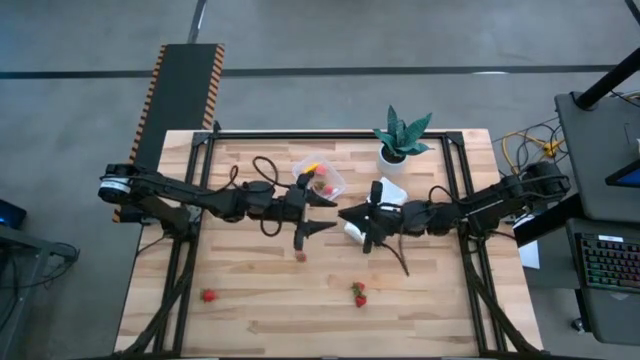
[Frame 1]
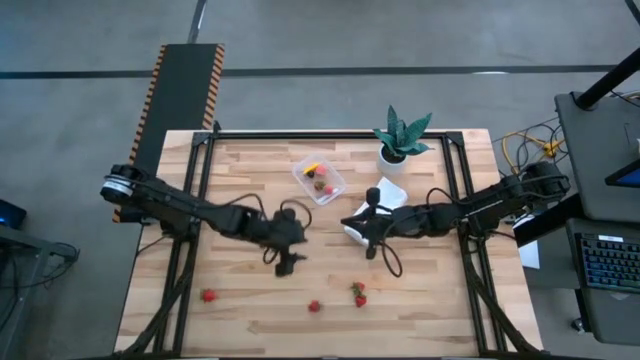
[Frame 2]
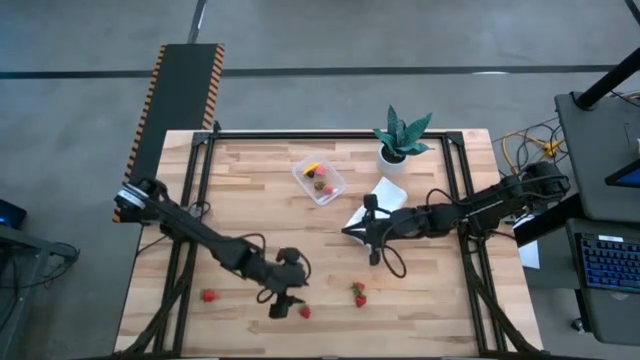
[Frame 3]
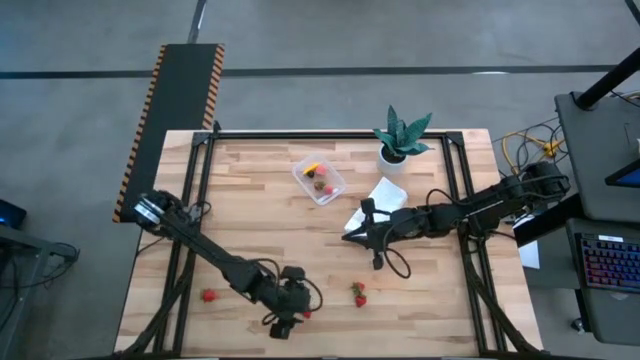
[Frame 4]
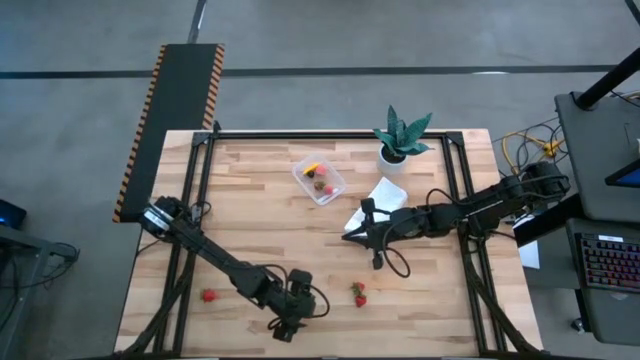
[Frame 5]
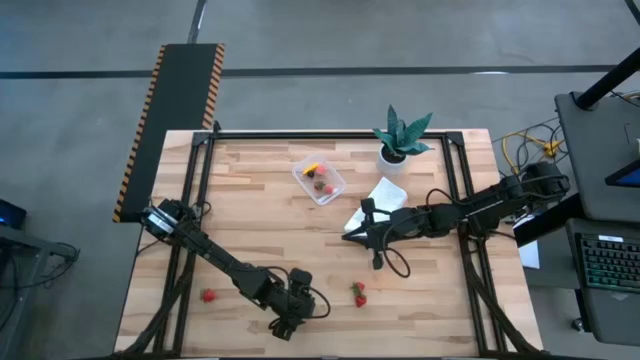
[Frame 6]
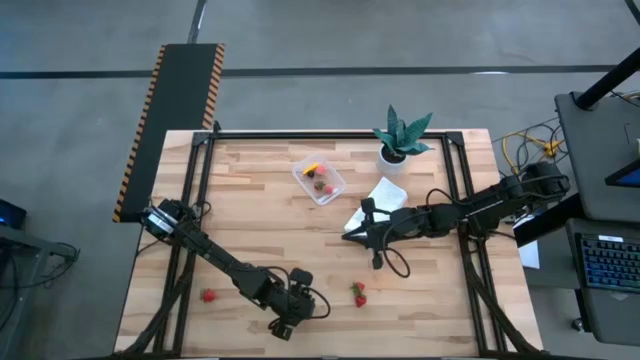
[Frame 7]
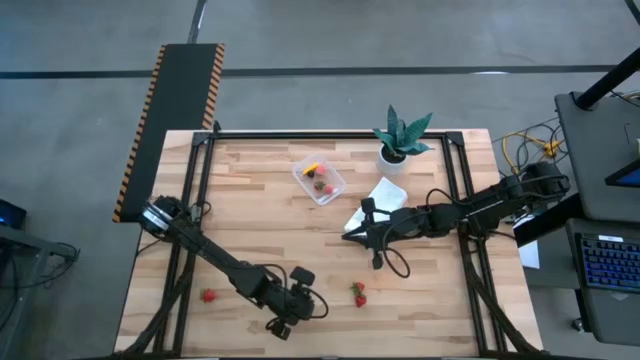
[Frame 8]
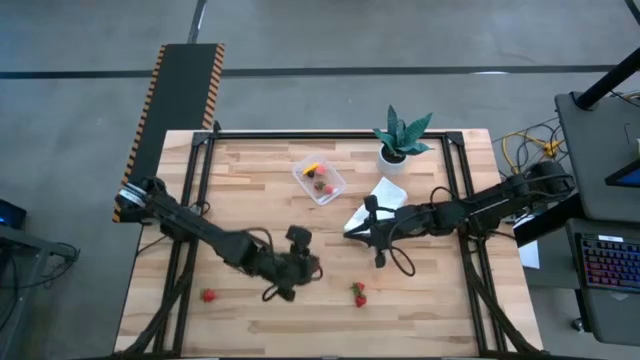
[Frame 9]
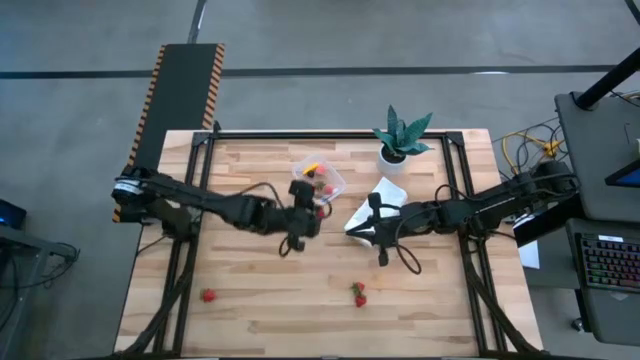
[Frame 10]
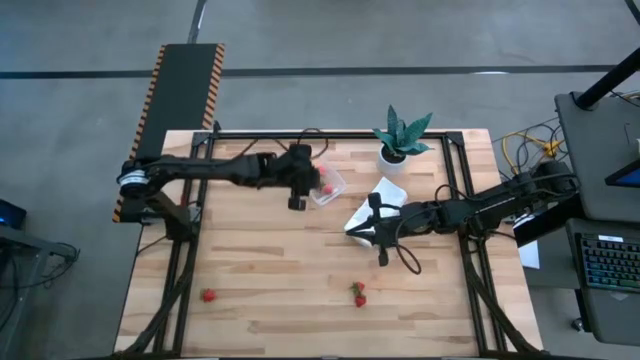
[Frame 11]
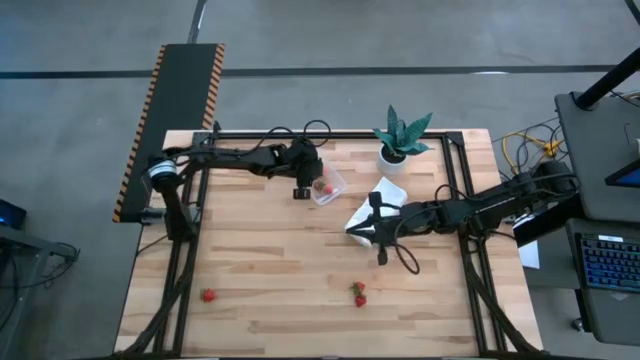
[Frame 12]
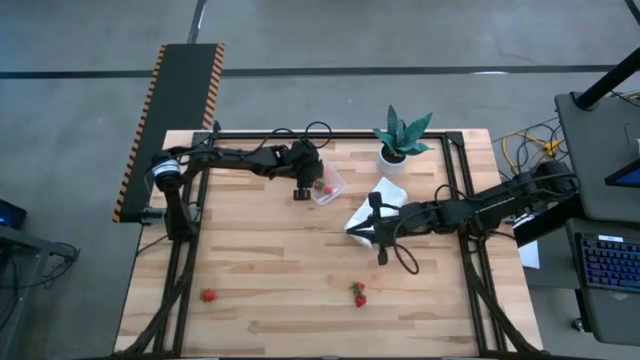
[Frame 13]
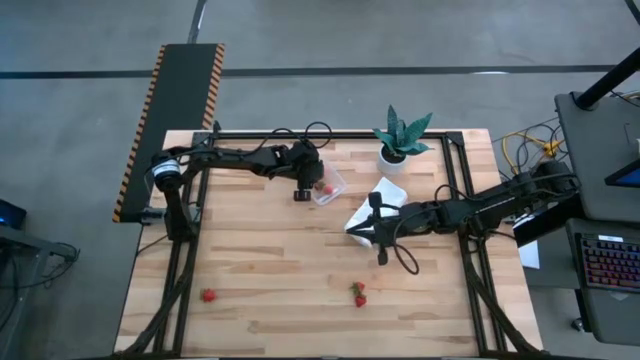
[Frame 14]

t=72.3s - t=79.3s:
Task: Pick and placing Produce into tupperware
Put the strawberry into the transparent bin

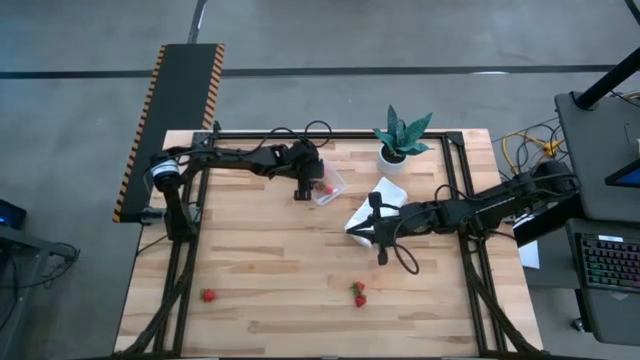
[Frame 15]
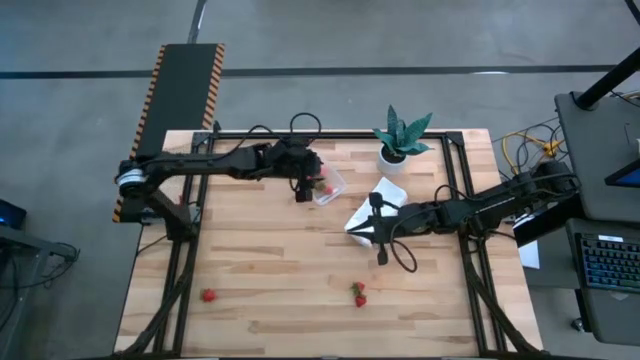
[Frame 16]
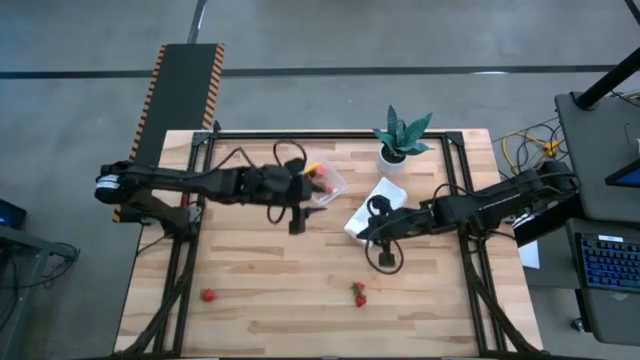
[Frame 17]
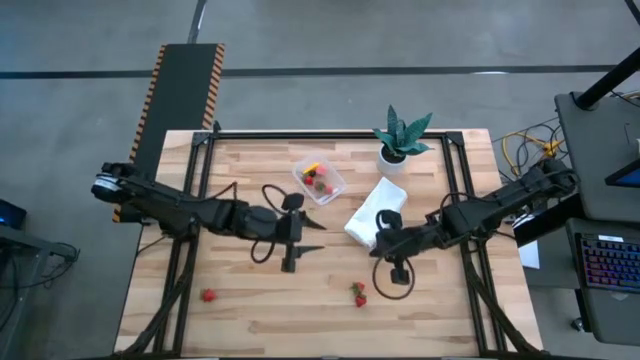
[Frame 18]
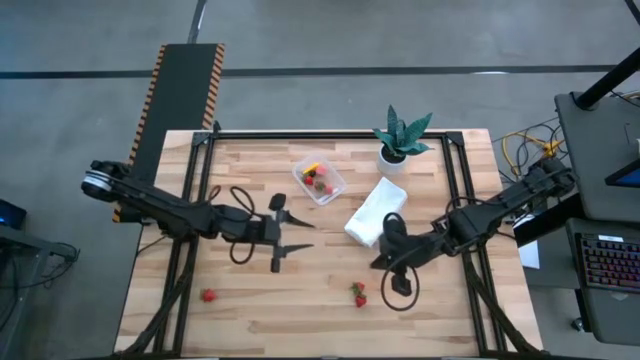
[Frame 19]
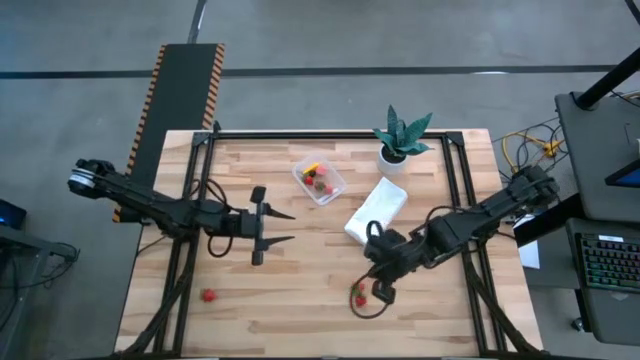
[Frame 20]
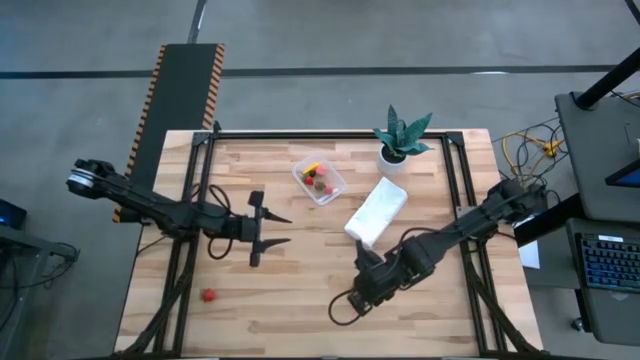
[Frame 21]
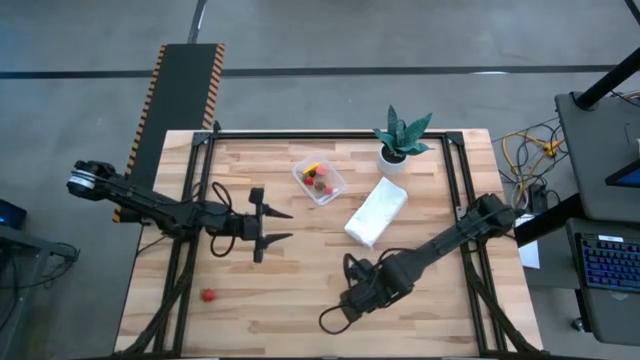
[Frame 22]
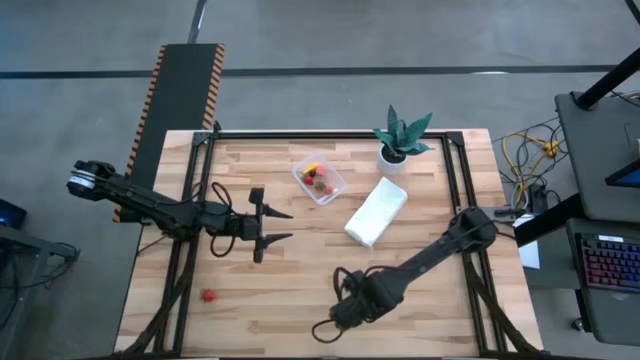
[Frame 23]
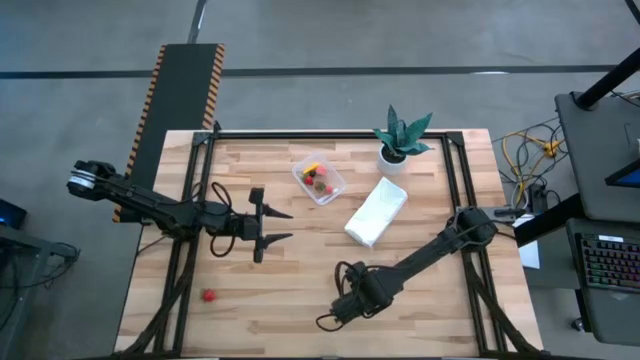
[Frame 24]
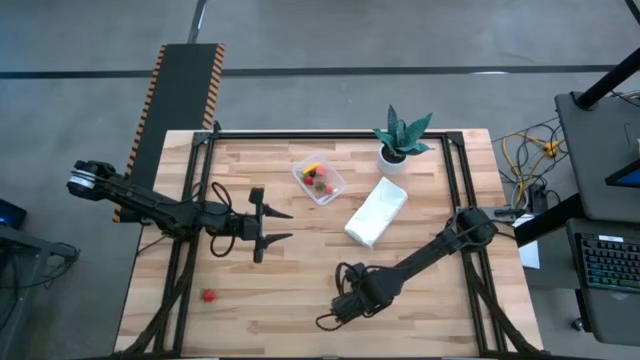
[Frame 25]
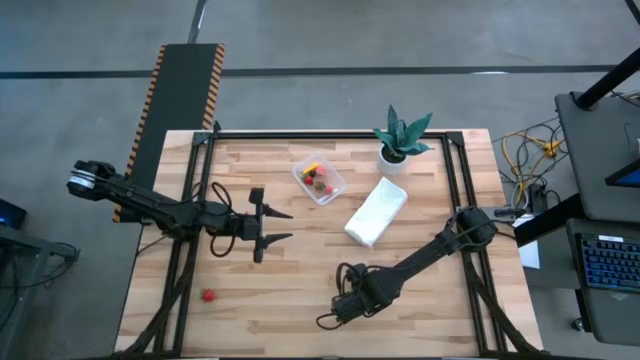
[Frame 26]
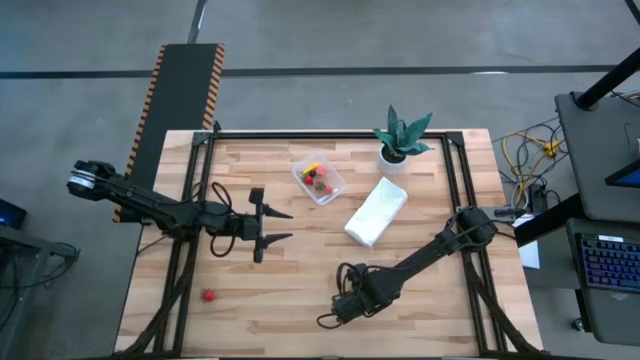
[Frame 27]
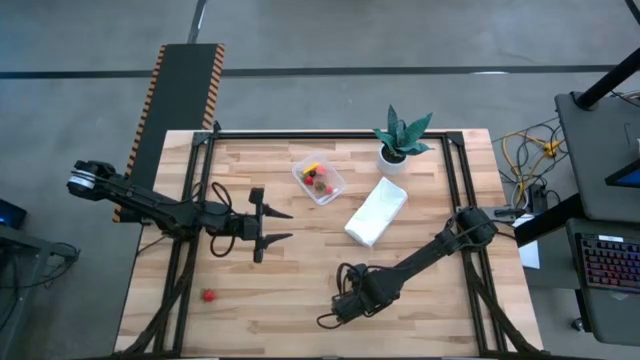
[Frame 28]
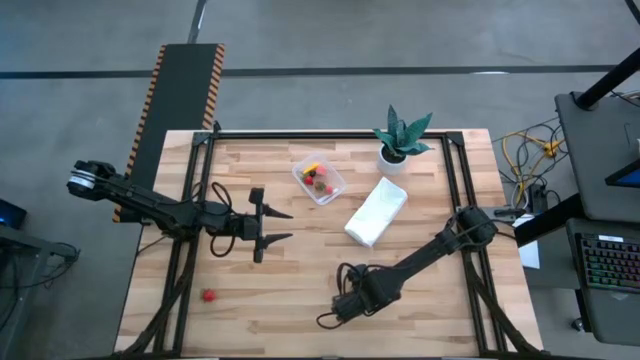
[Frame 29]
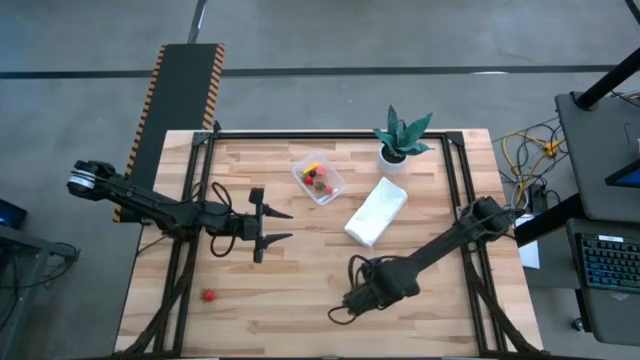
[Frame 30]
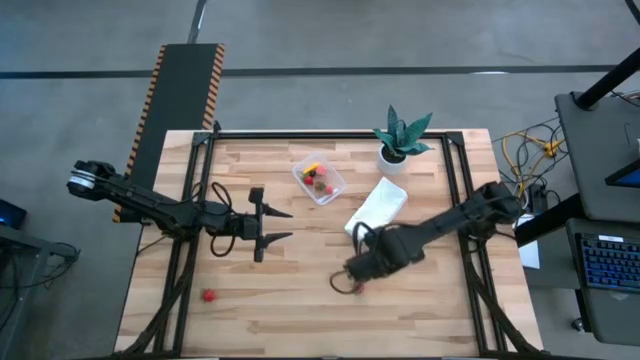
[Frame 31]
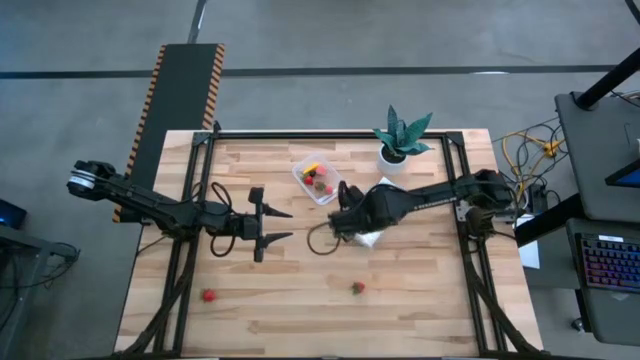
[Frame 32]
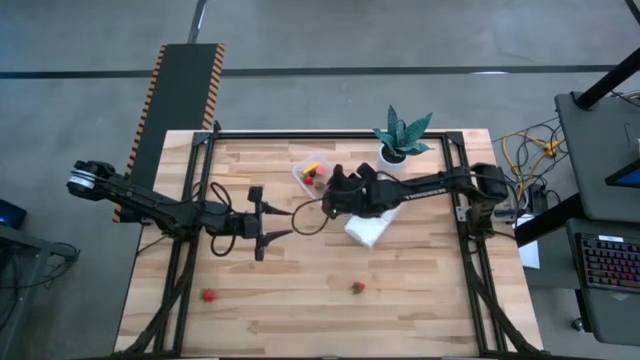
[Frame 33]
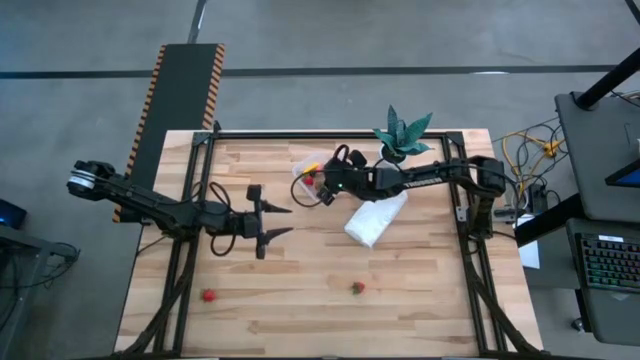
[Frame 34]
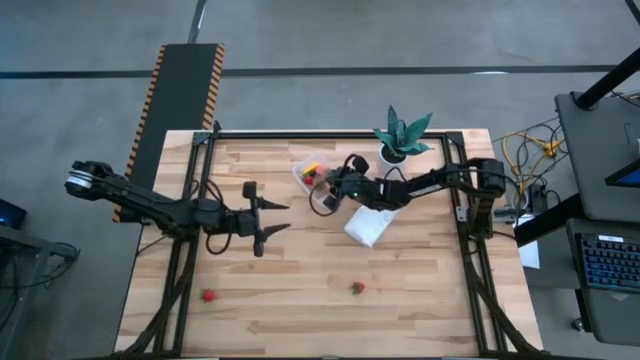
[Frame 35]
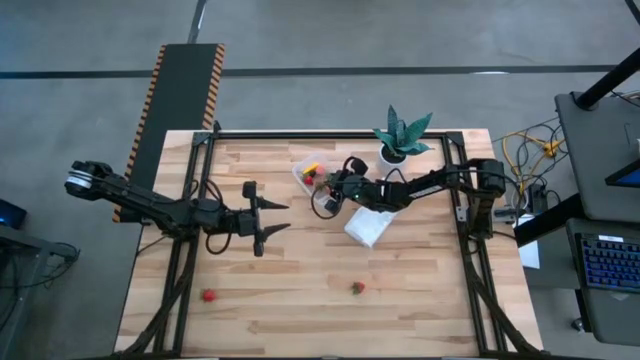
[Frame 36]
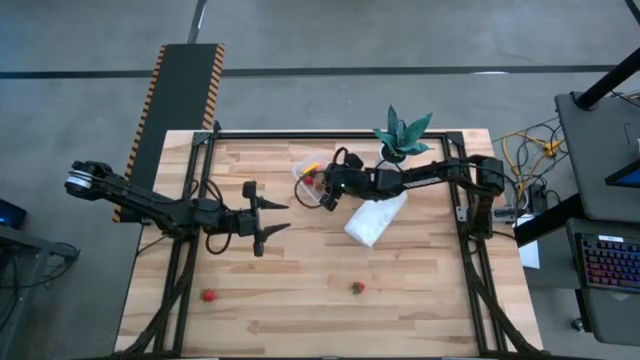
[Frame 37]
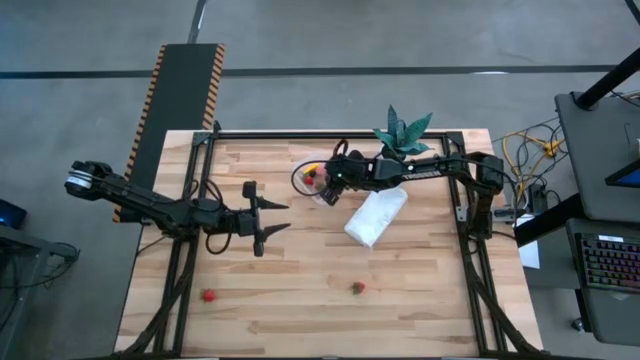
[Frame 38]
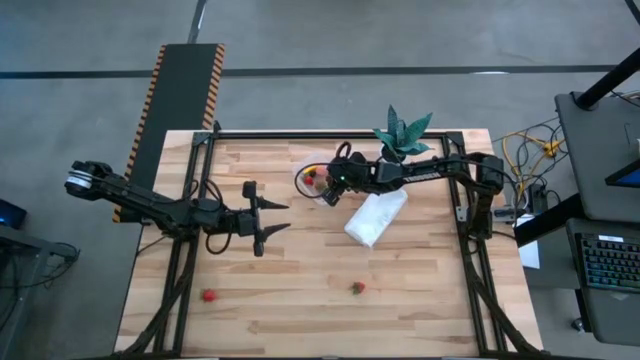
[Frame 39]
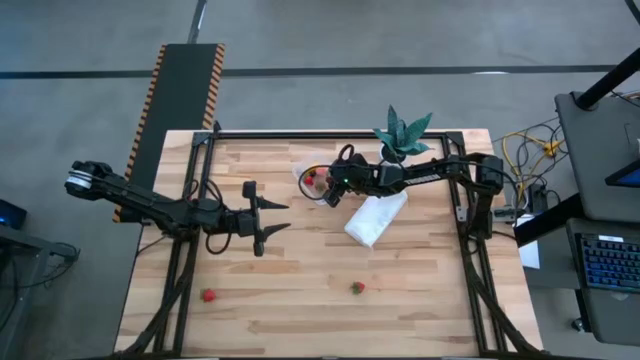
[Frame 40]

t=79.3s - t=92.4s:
Put the strawberry into the transparent bin

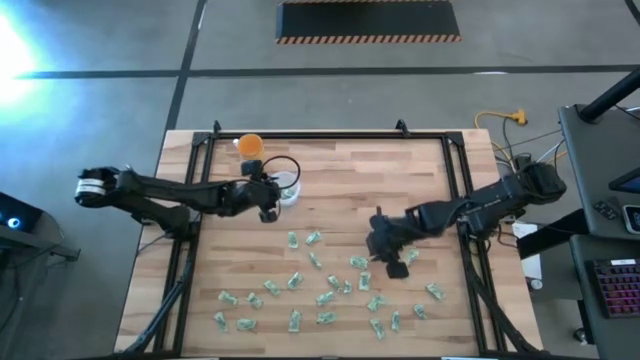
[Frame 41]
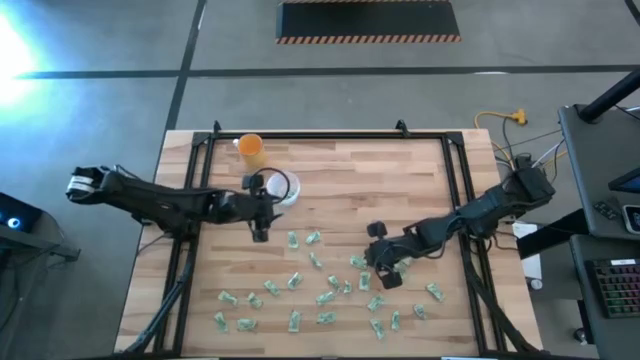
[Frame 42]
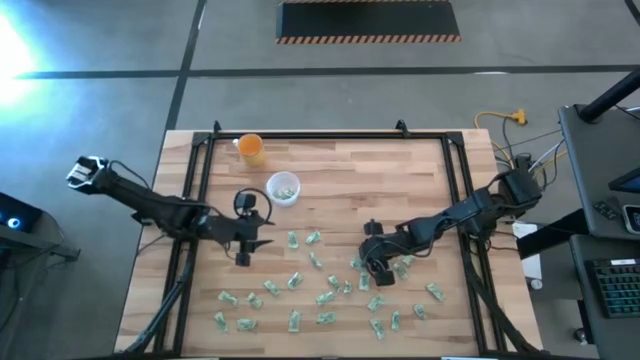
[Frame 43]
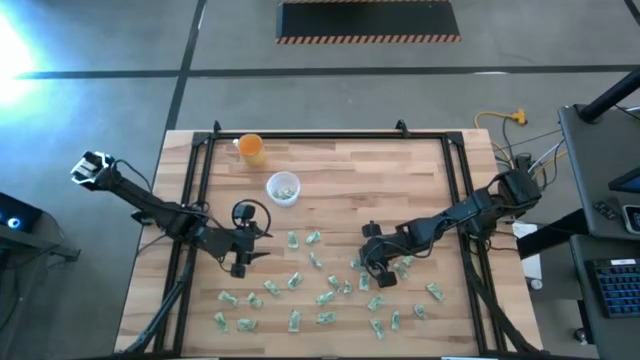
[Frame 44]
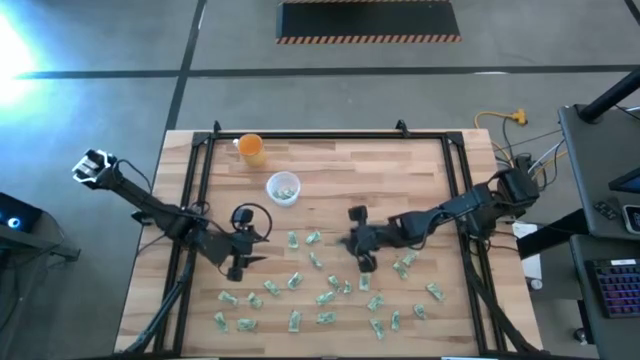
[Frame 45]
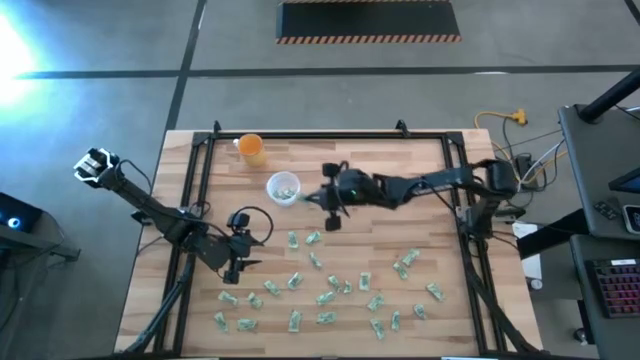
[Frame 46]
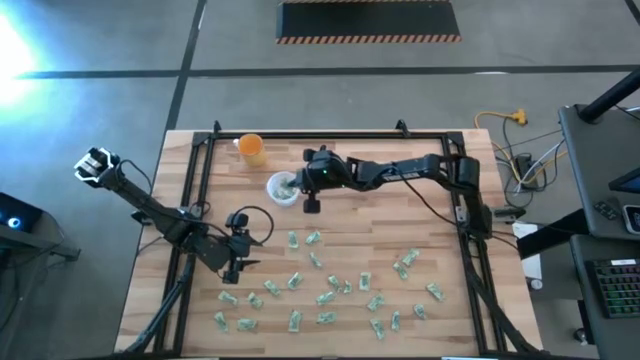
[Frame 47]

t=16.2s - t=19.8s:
Task: Pick and place Stevia / Truvia into bins
Put the stevia packet into the transparent container
